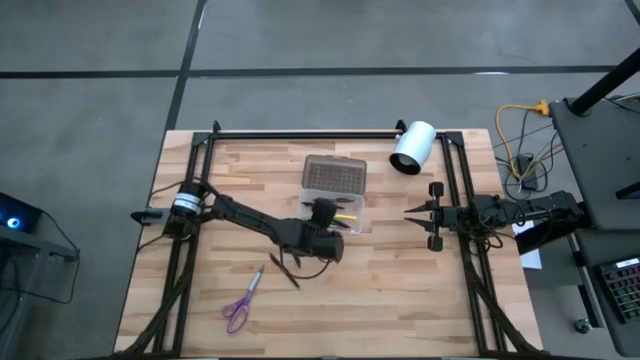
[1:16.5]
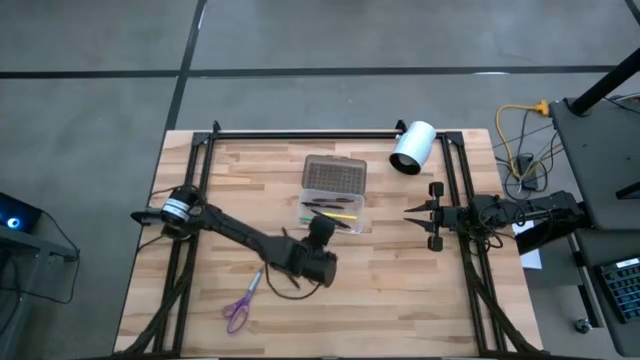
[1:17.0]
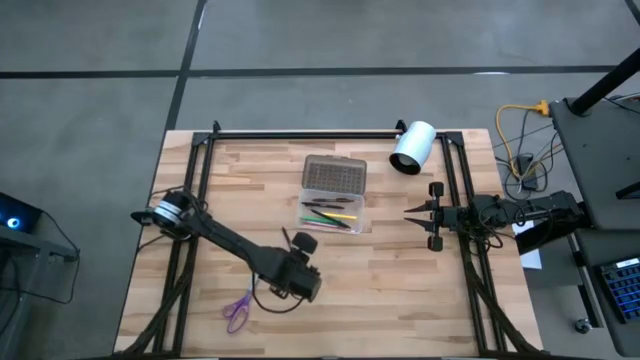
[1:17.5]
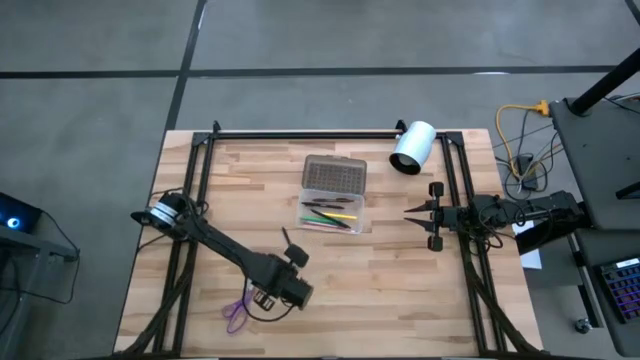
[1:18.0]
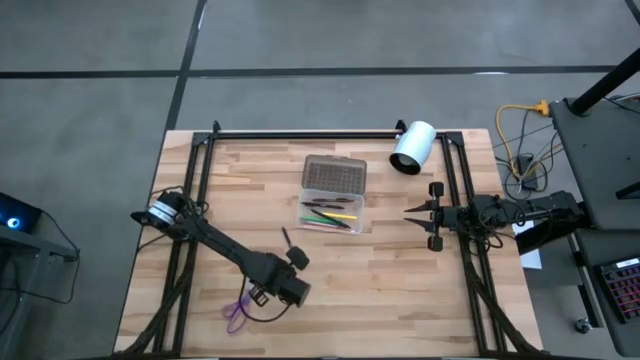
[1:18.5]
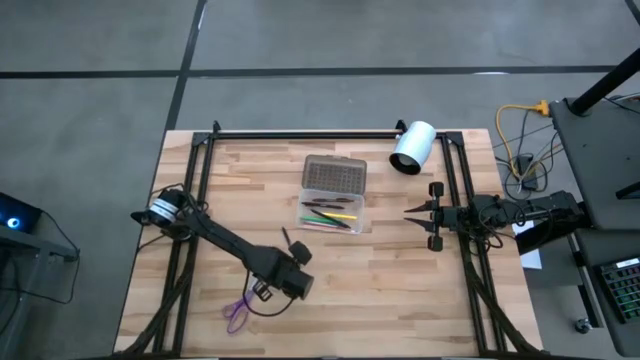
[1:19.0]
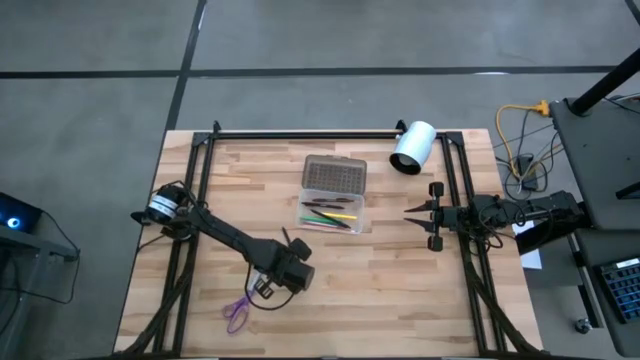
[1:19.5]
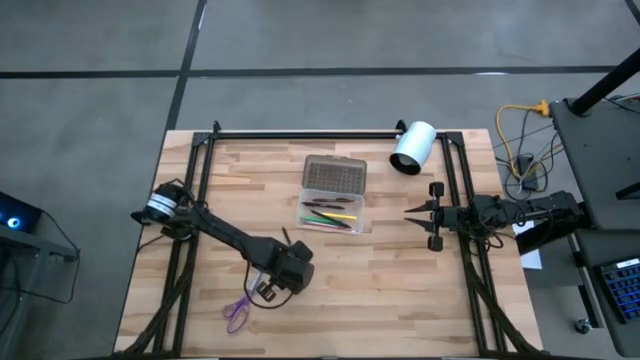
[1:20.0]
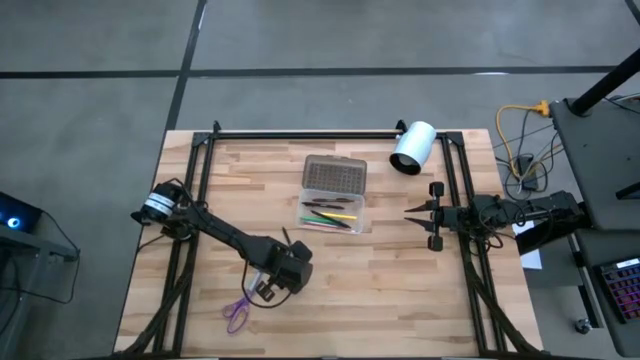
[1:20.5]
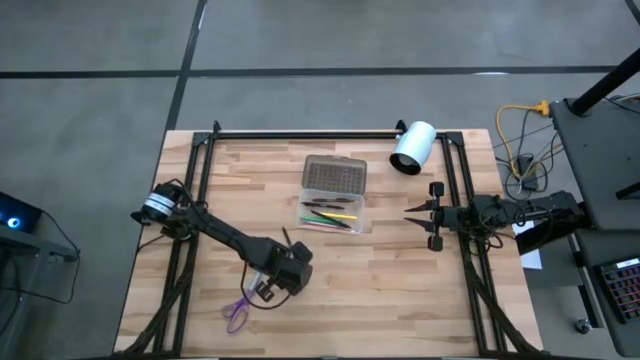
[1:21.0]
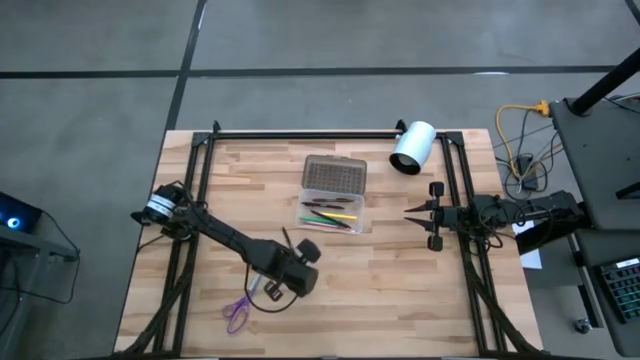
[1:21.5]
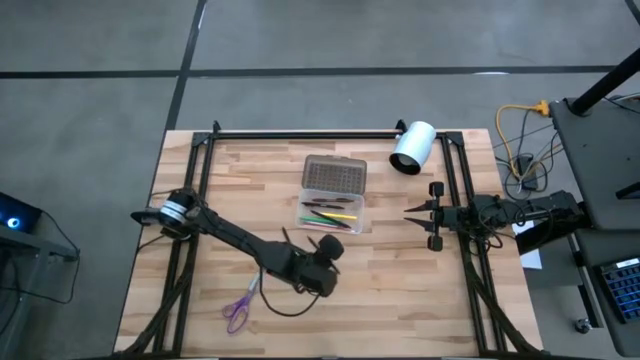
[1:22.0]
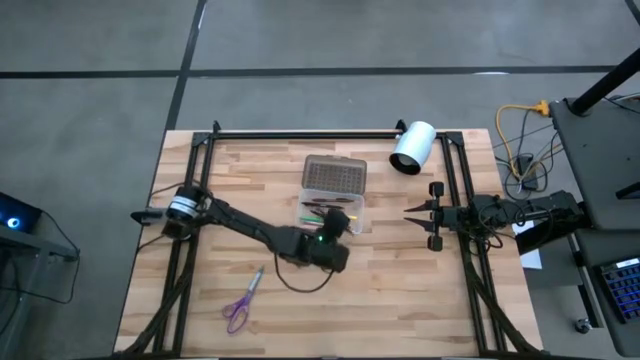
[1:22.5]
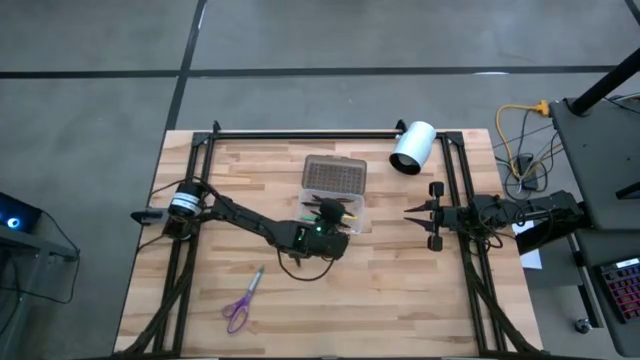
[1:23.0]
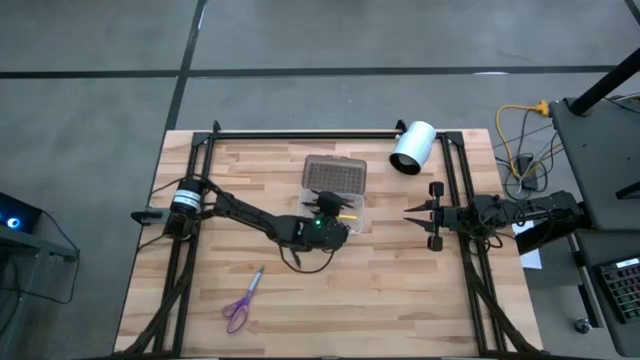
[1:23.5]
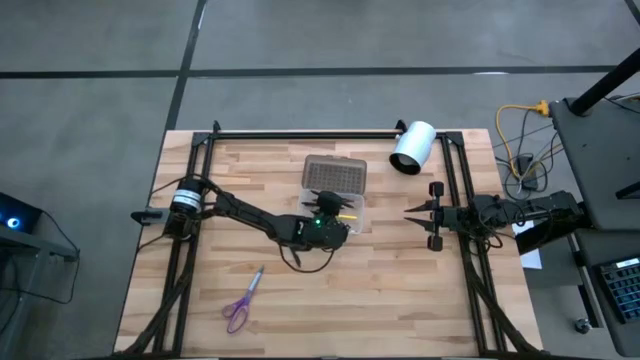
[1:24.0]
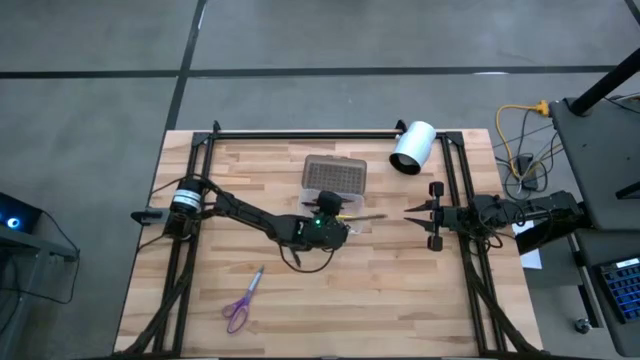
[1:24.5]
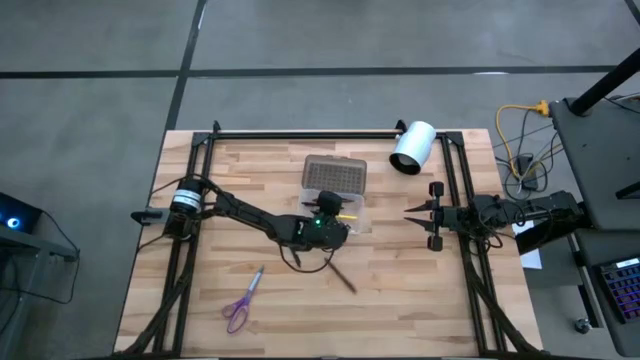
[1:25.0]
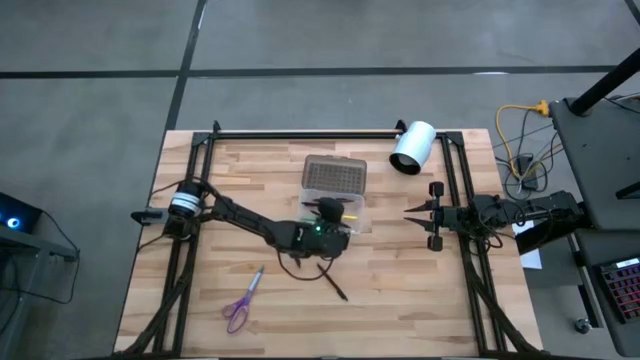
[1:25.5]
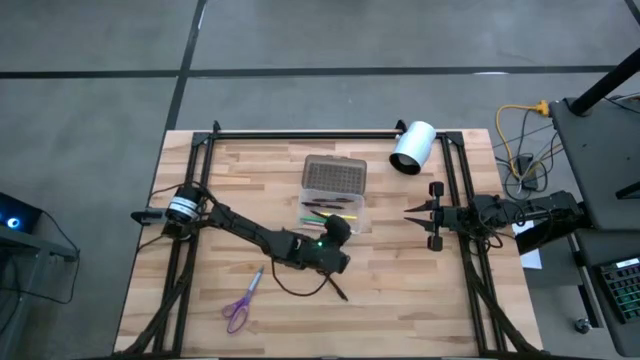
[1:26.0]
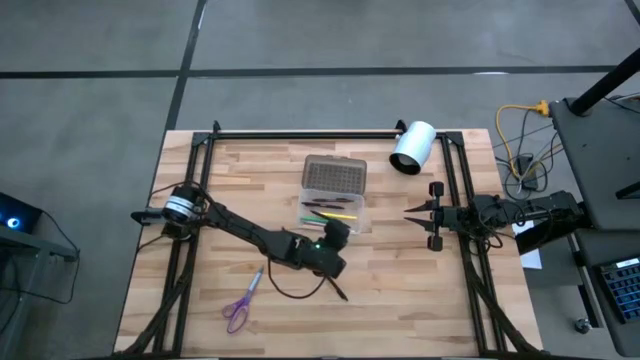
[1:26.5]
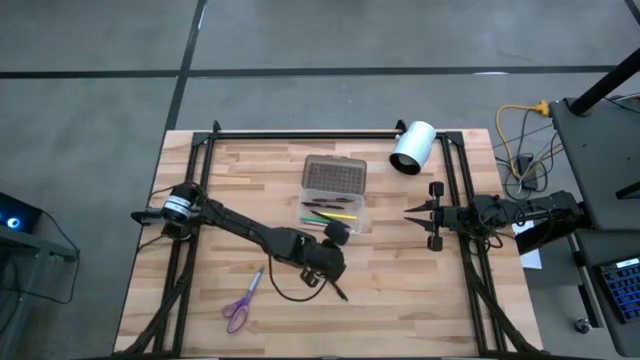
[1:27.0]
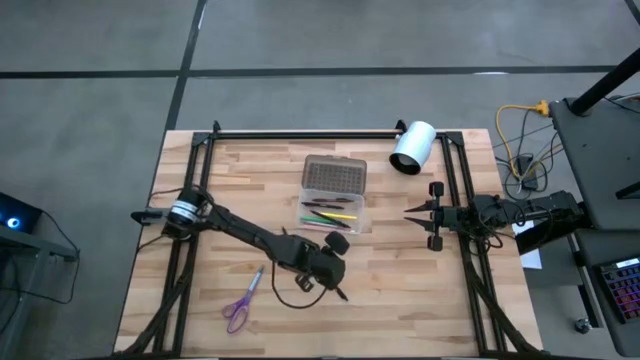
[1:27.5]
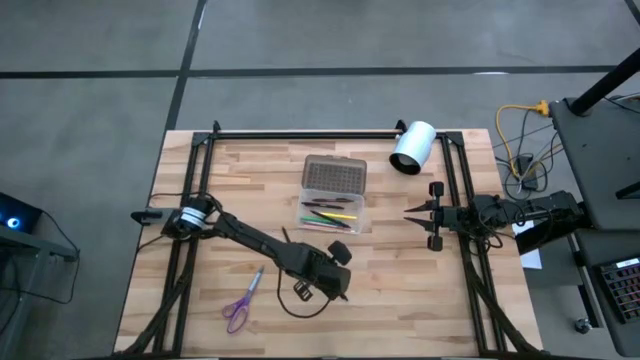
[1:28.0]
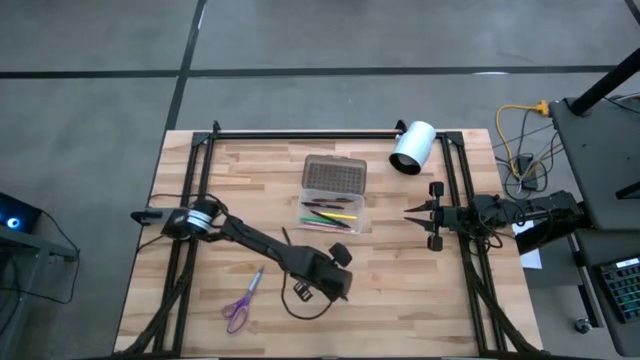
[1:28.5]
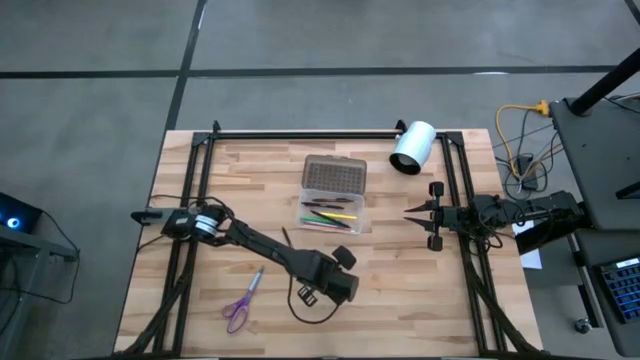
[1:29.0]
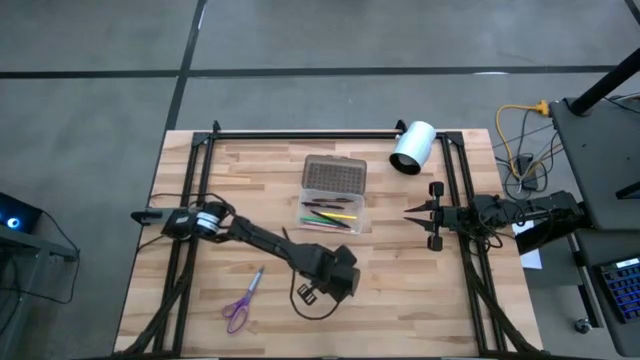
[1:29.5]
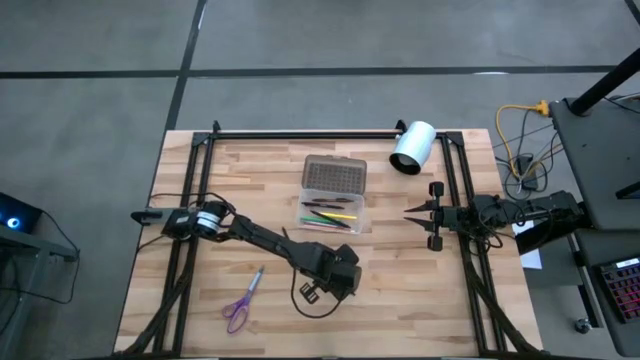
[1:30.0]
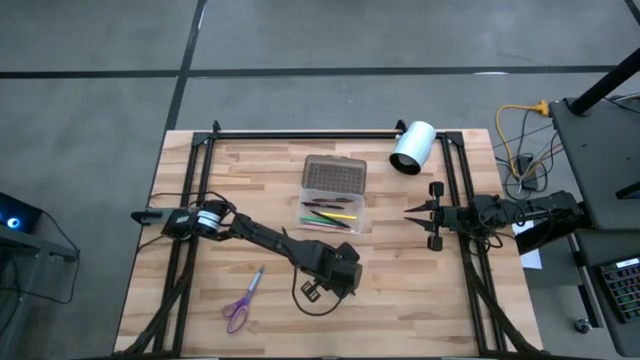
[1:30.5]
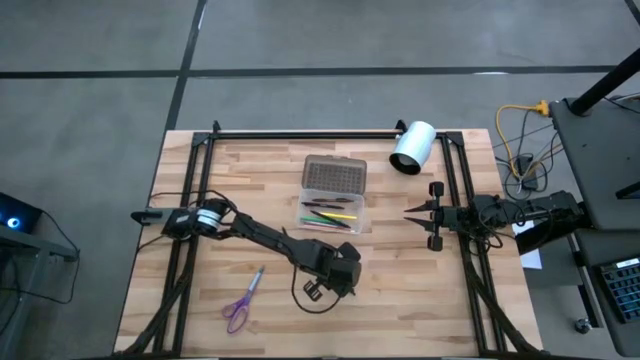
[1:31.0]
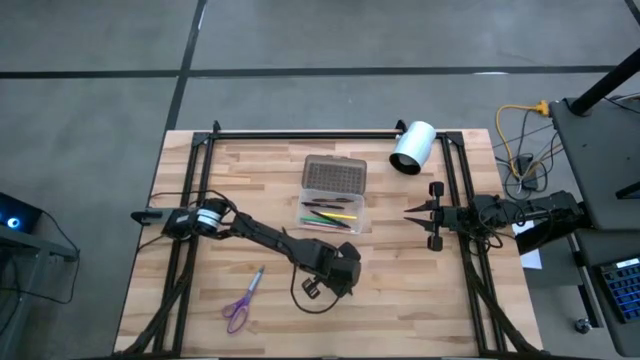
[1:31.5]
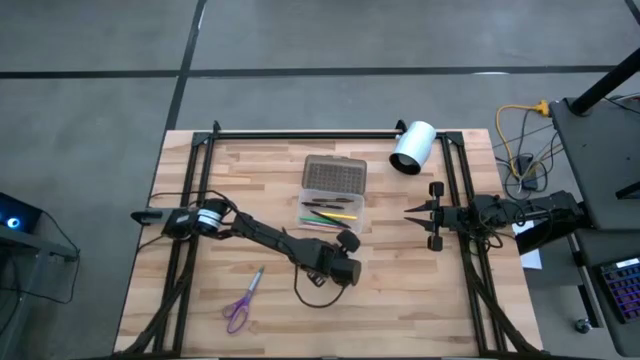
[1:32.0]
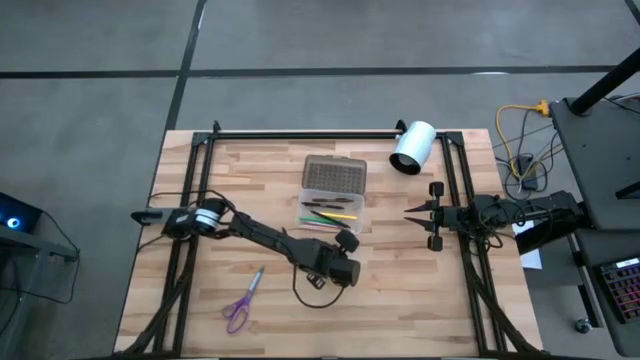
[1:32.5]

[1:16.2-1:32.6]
Task: Pick & place school supplies into a supply box
Put the black pen into the black supply box

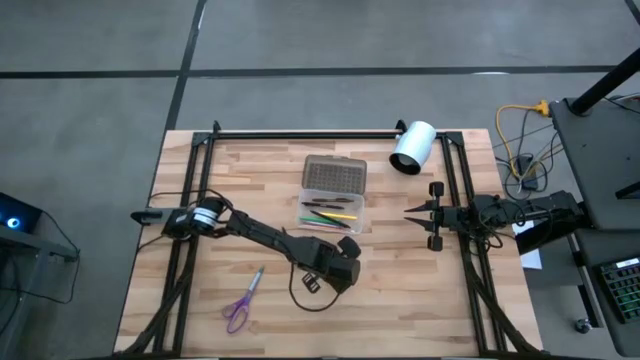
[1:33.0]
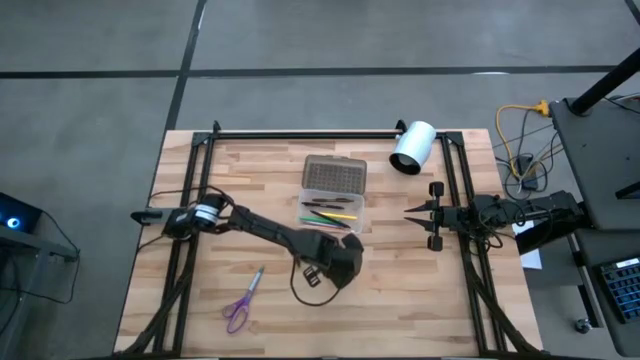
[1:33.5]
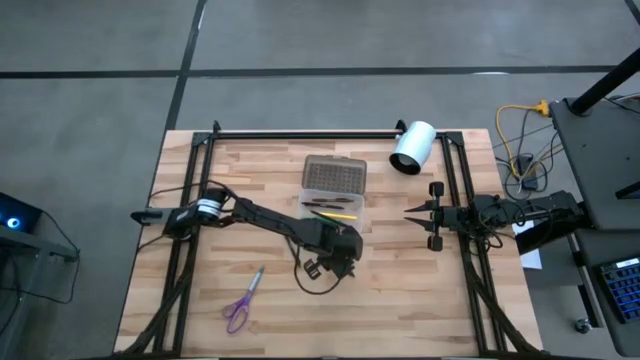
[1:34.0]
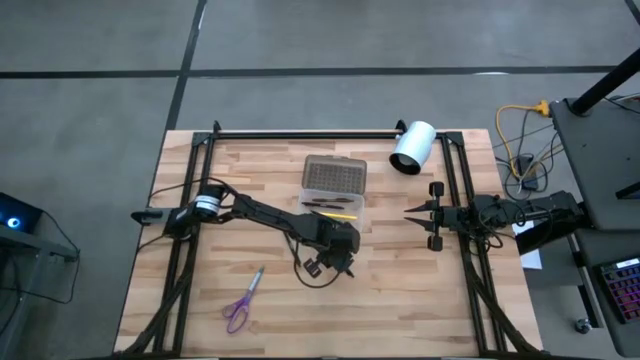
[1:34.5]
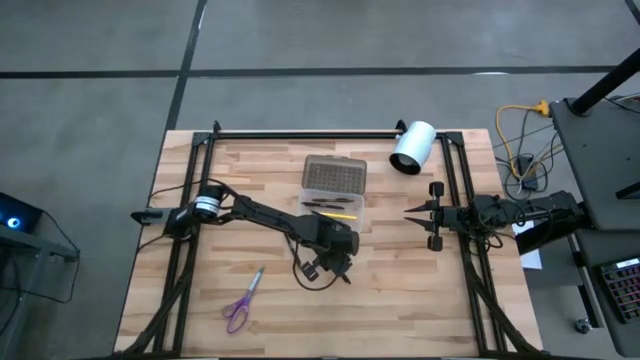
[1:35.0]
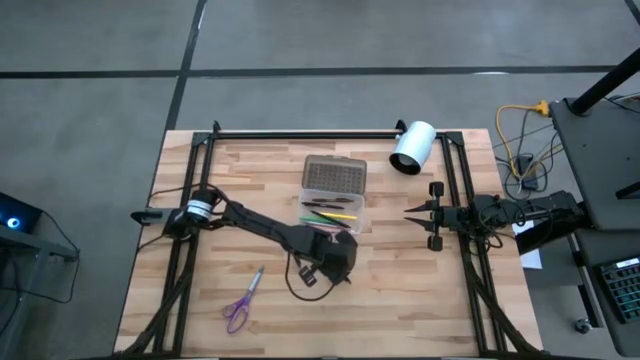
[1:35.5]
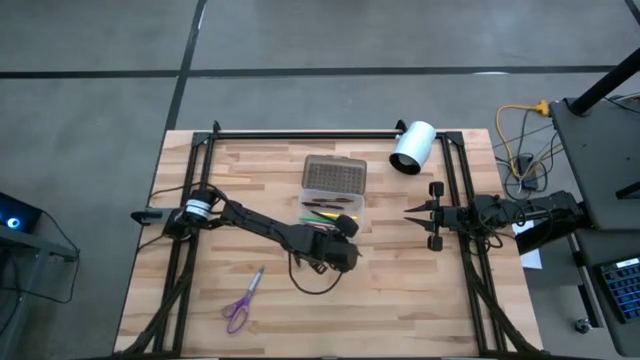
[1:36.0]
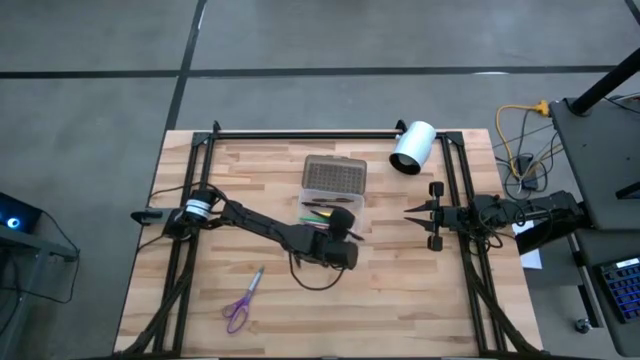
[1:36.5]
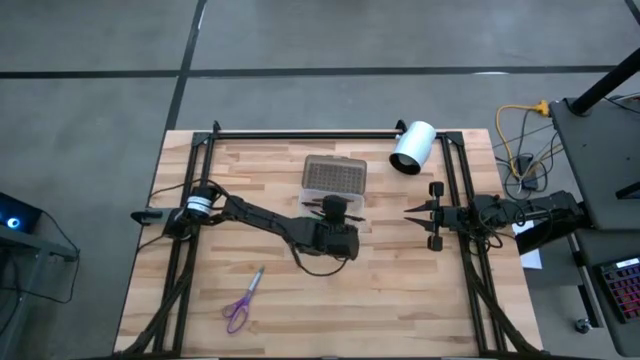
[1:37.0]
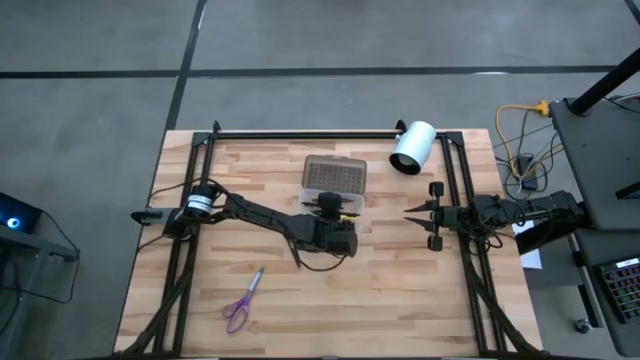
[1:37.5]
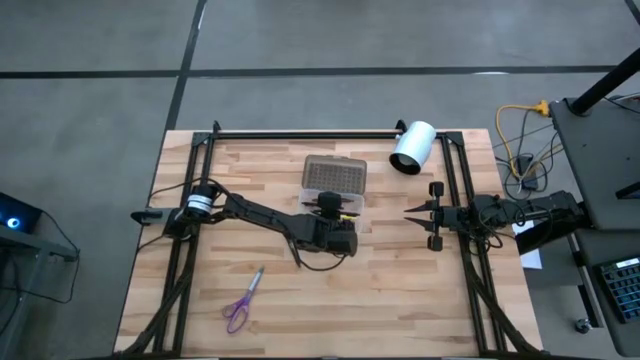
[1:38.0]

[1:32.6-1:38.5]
Put the black pen into the black supply box
